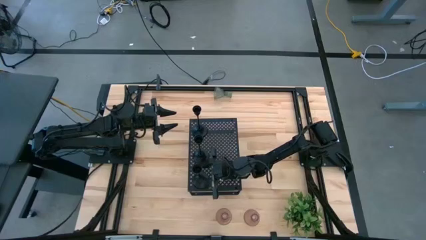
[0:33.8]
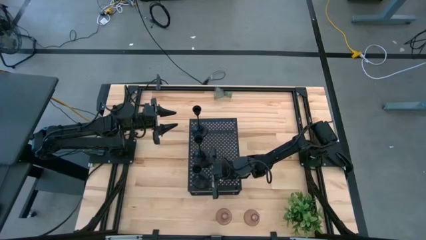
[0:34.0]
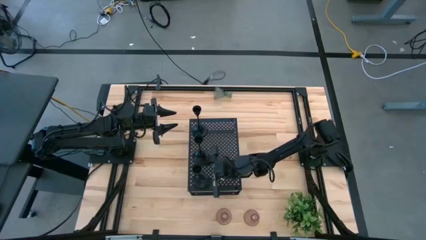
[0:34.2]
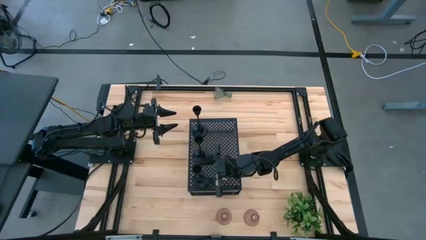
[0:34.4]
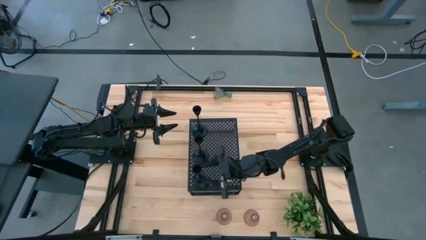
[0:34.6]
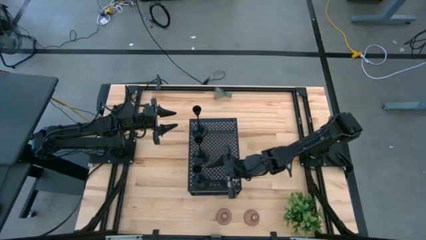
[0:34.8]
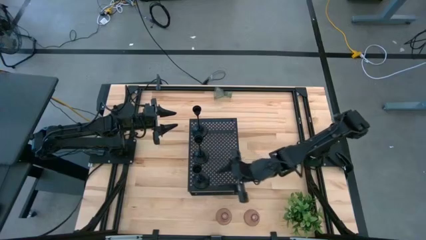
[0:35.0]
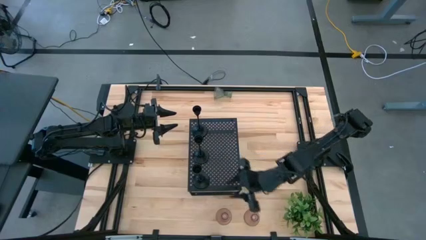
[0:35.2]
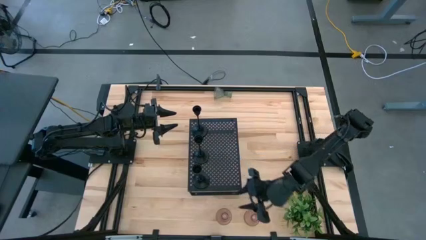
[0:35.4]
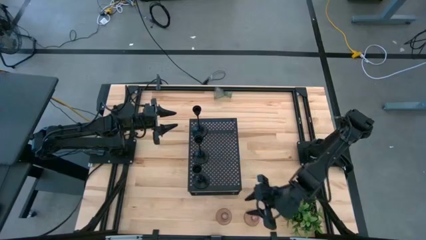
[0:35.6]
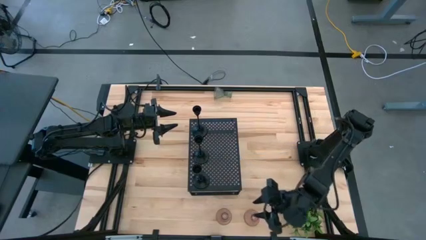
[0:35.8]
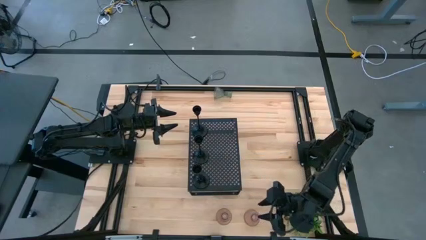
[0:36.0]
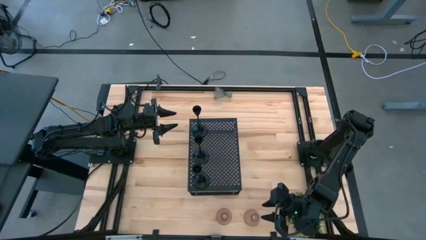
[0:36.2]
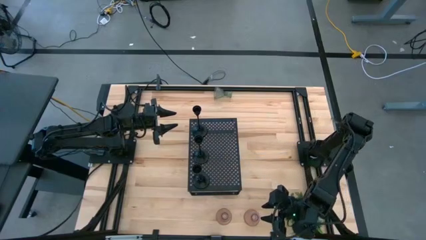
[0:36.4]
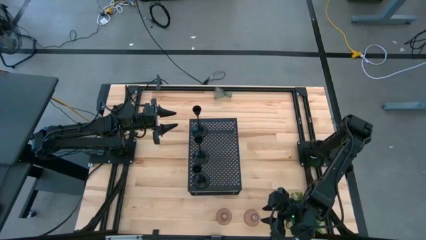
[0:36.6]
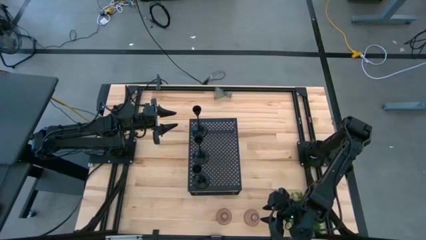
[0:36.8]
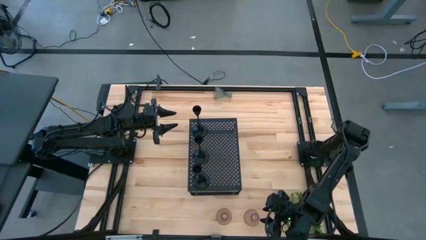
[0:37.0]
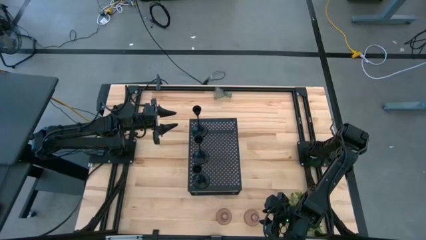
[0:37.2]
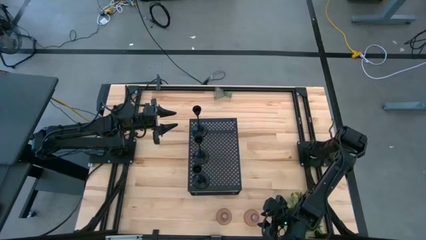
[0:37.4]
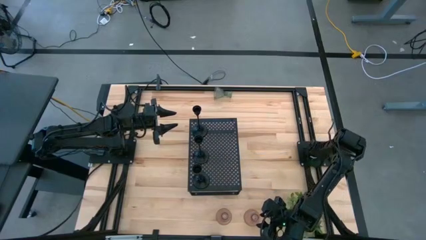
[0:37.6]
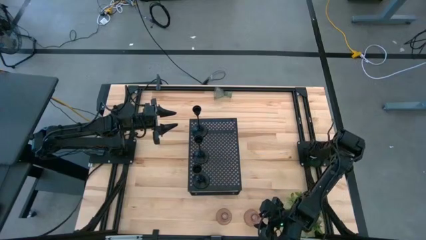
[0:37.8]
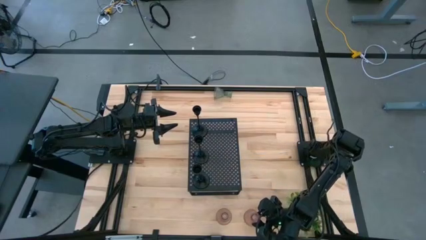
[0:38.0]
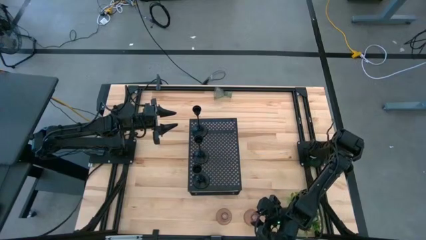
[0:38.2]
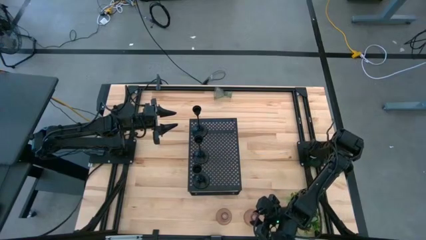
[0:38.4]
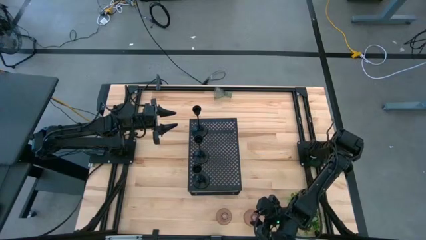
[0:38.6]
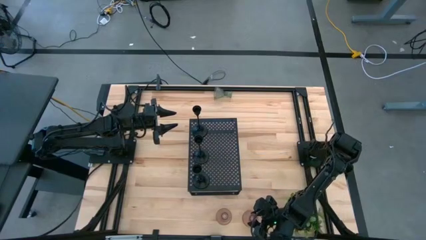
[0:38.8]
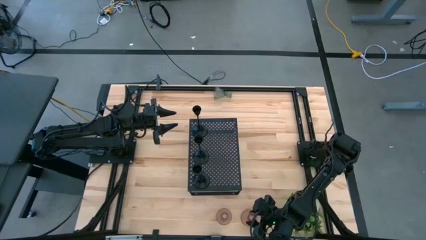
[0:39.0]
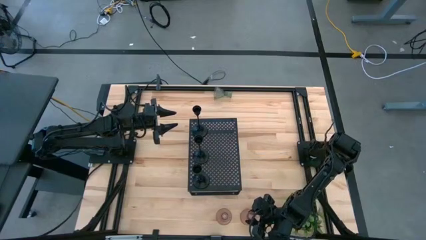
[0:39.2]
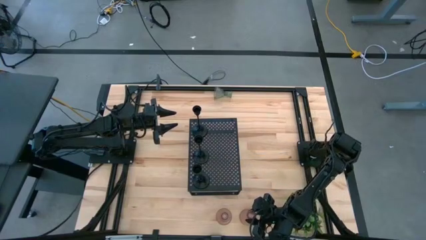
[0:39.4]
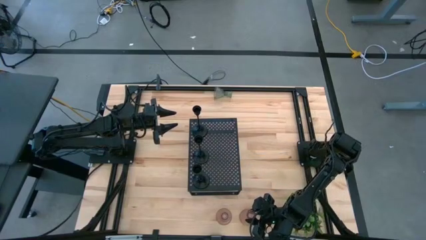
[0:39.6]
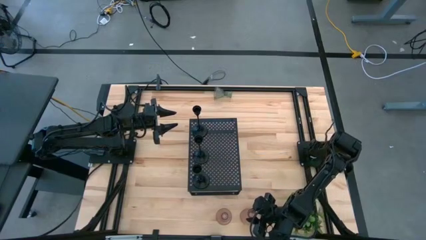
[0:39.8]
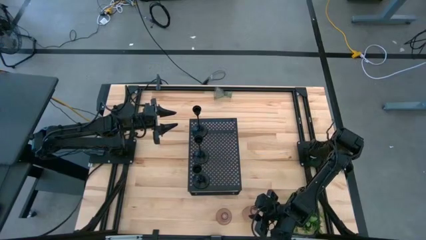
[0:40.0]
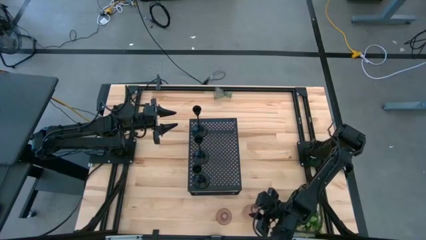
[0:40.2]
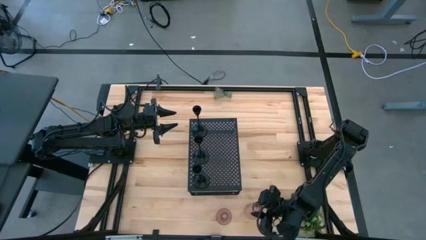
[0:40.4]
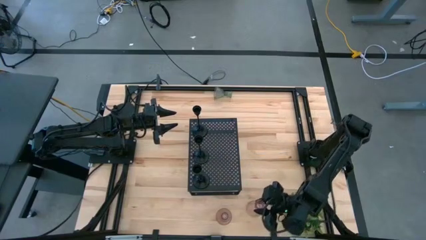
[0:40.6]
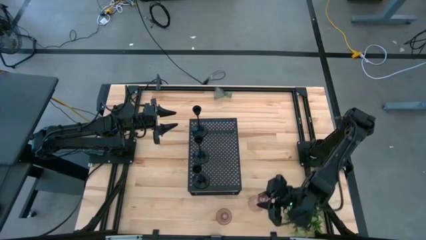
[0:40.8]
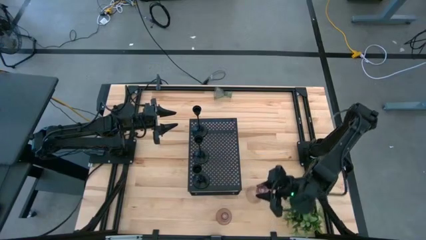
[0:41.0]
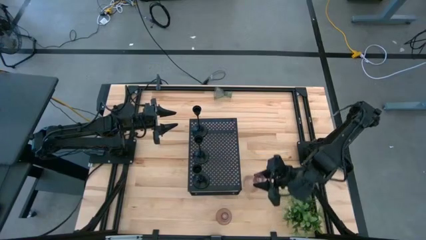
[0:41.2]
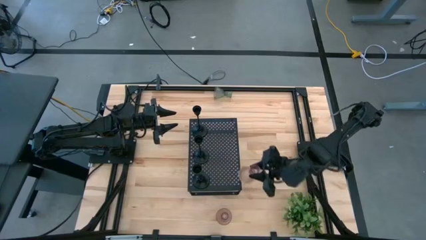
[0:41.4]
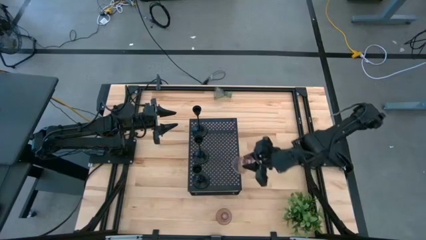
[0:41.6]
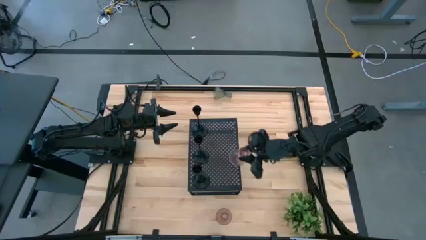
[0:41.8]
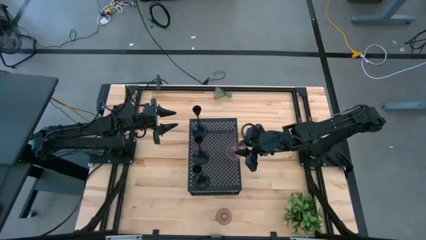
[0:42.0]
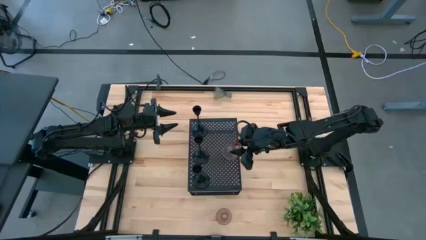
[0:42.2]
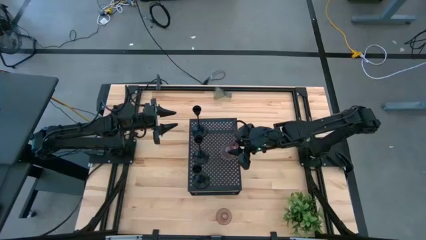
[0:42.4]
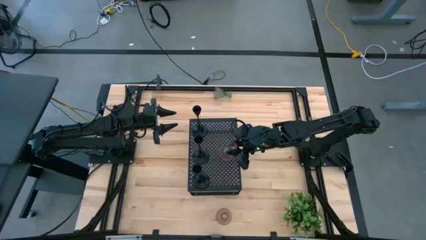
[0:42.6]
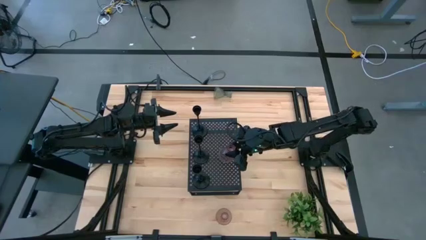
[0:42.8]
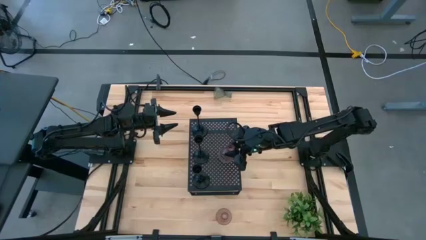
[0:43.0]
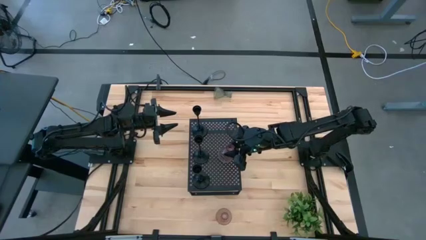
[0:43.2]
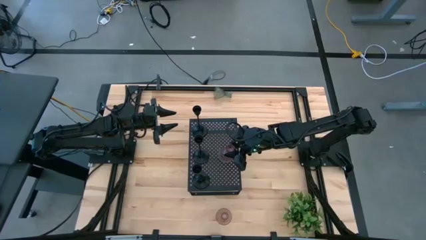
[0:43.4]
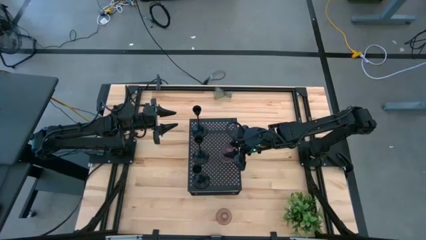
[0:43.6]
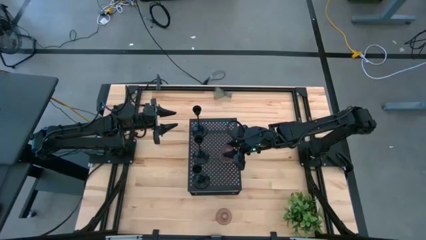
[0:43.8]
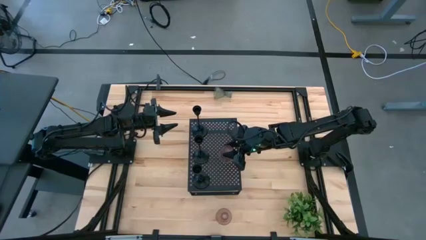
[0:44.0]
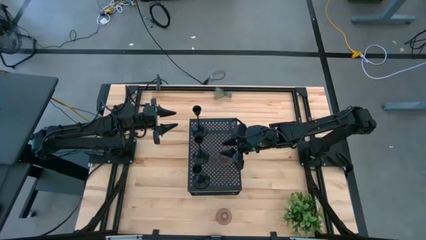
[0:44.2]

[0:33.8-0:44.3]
Task: Pick & Place candle stick holders
Put the right violet glass candle holder on the shelf
